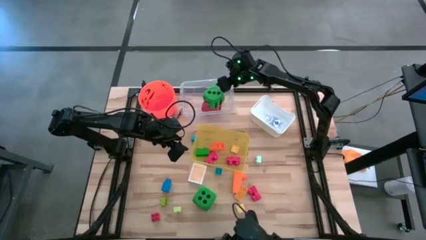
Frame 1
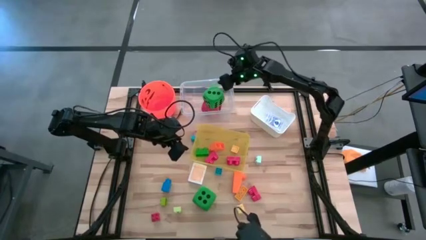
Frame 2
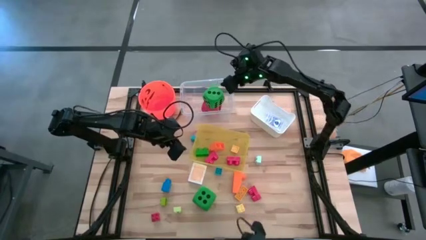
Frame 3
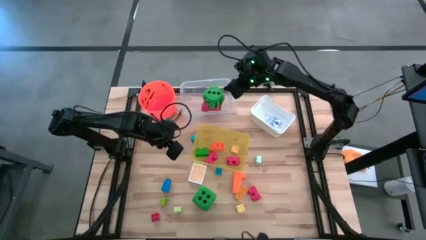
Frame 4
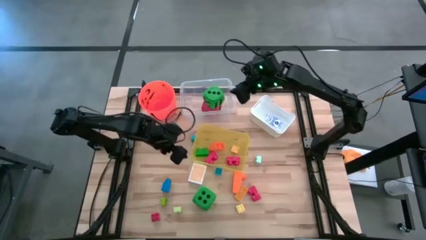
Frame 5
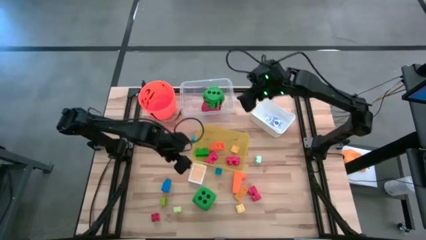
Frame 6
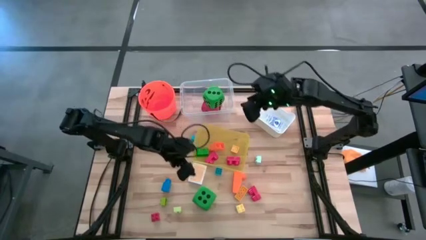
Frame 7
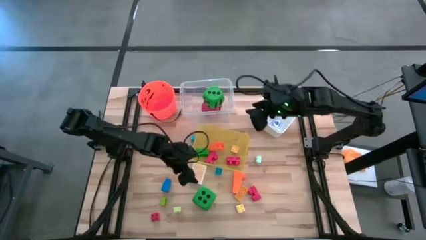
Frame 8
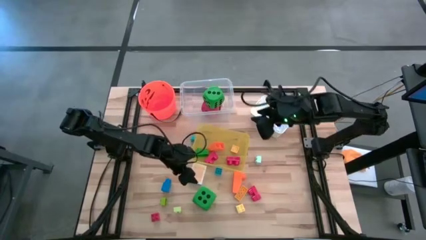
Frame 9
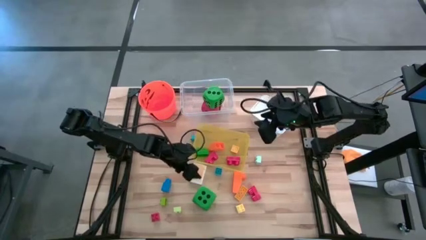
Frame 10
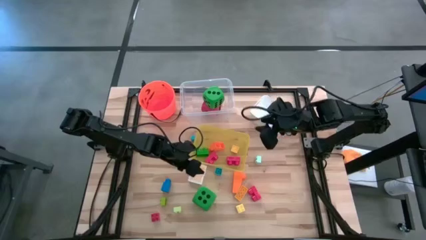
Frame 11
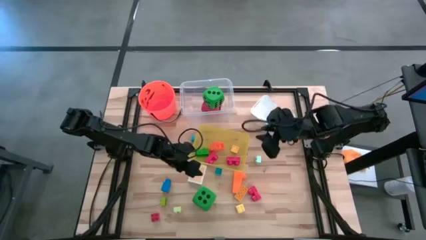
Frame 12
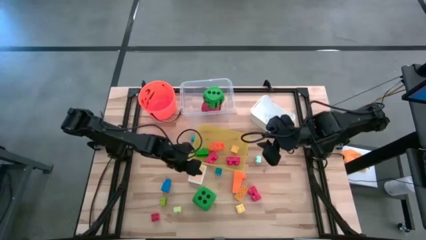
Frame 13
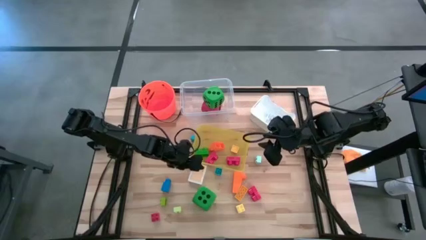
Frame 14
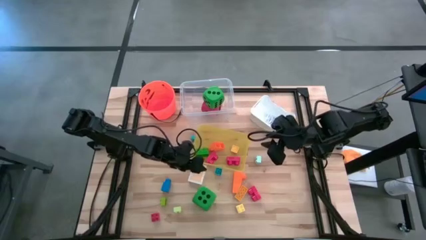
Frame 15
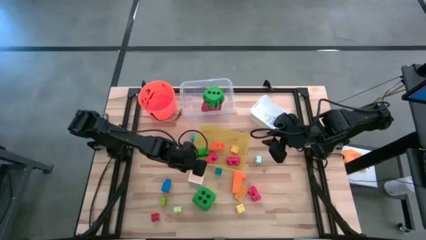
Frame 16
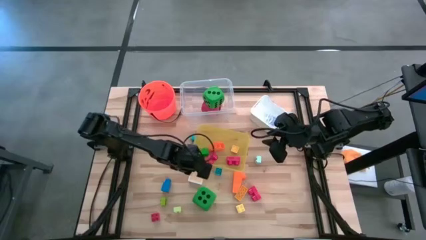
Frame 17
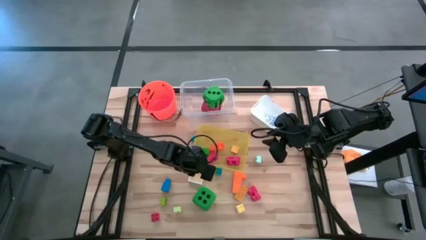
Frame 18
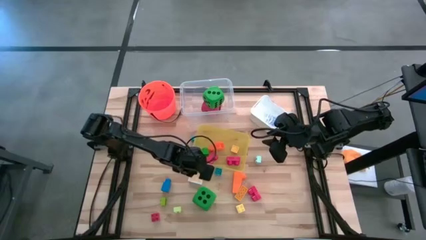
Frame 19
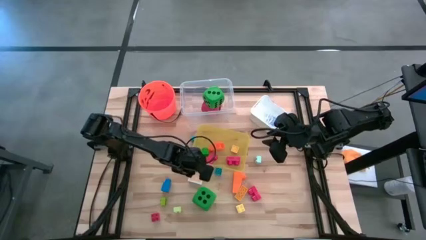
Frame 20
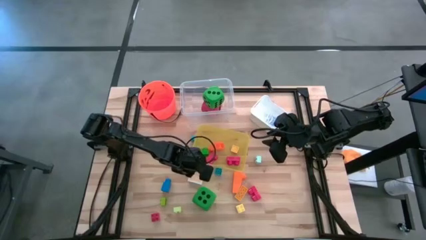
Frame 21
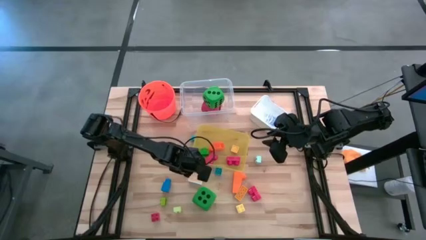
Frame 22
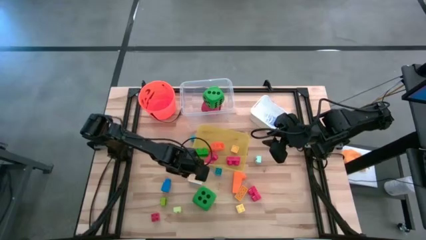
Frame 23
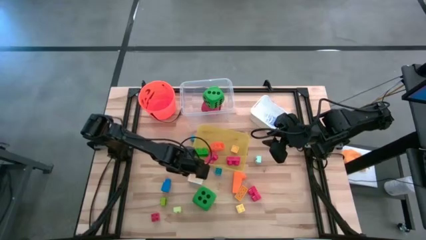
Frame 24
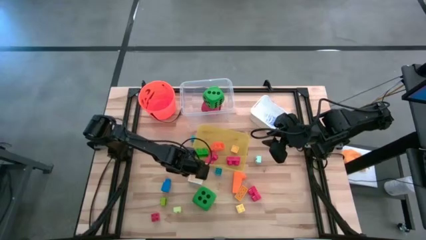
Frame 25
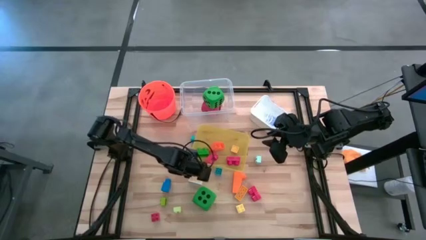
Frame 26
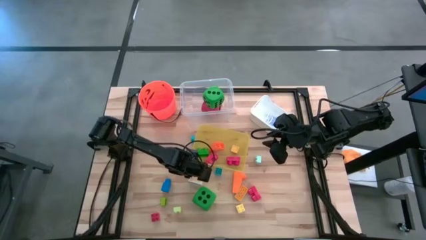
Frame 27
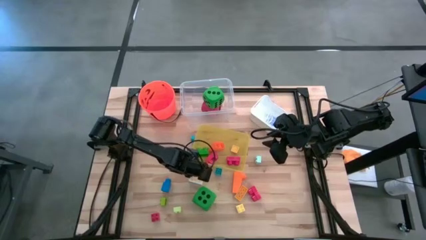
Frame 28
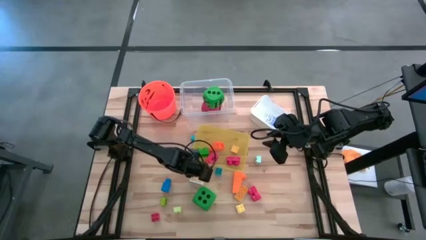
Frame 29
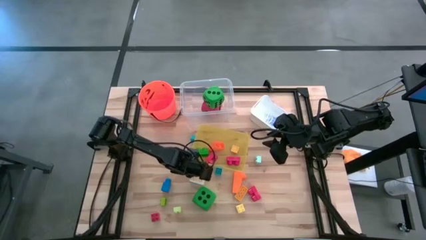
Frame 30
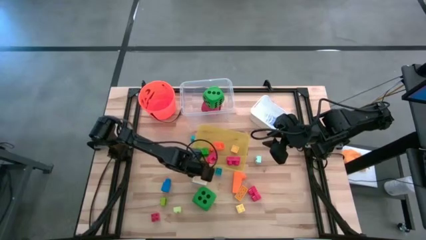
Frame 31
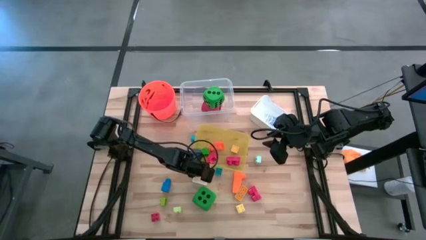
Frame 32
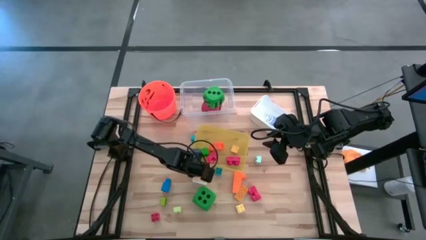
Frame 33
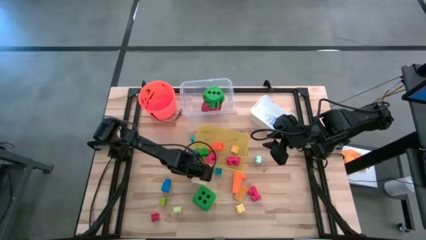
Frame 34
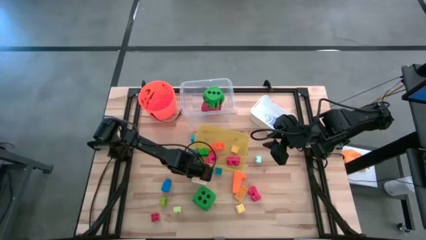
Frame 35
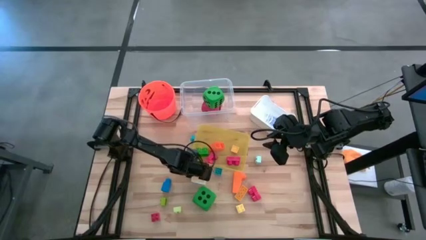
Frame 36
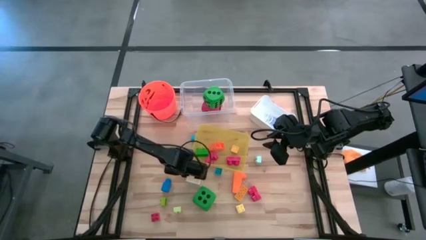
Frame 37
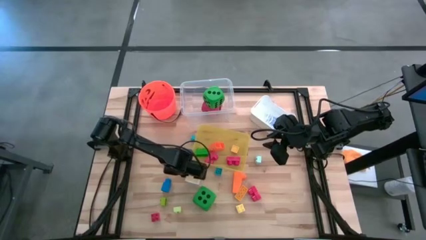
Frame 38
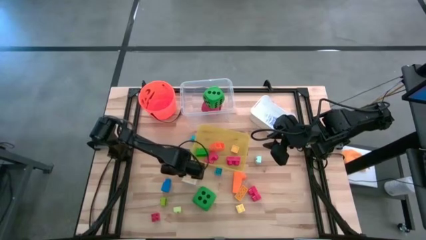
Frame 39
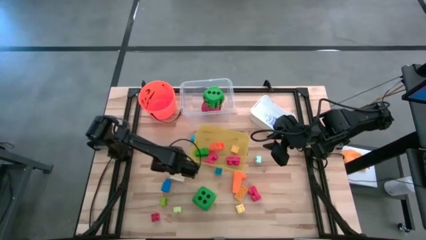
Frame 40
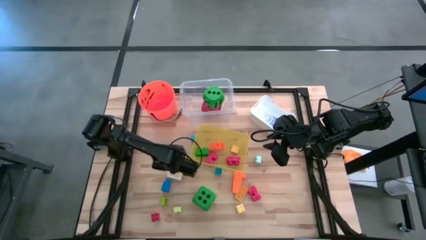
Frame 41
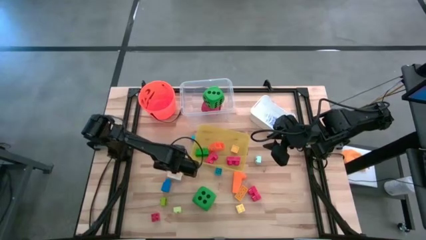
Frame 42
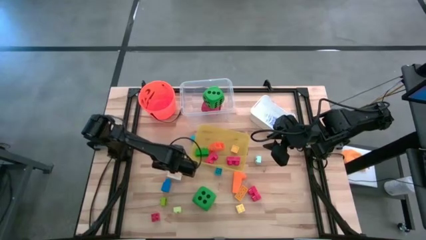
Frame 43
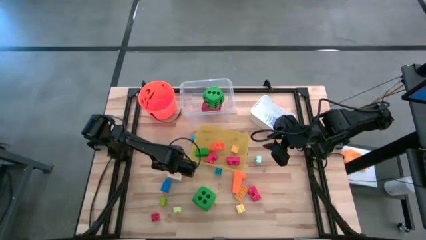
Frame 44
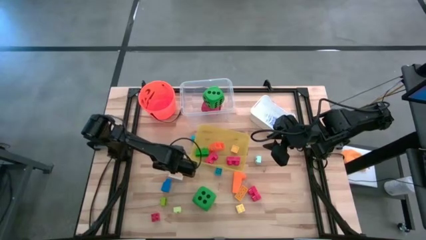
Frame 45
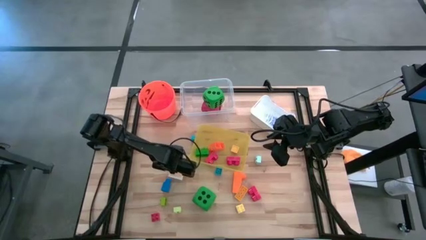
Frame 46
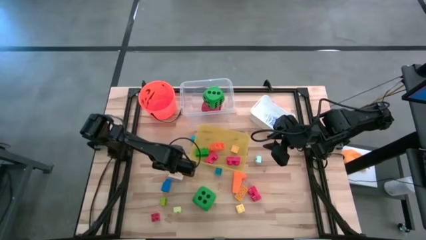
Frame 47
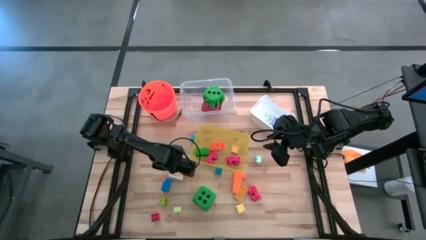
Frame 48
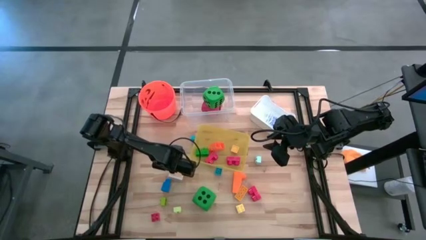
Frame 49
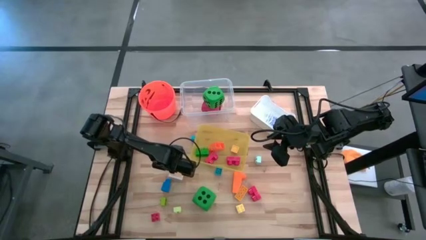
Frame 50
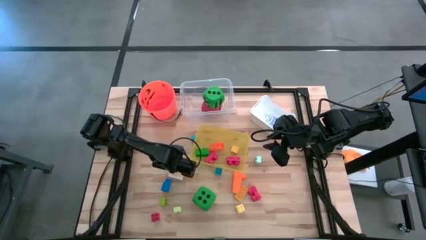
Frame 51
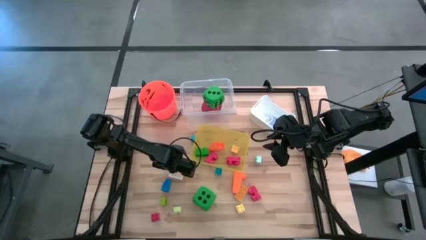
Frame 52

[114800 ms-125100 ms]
Task: Pick & Place Toys
Put the yellow game card into the white bin

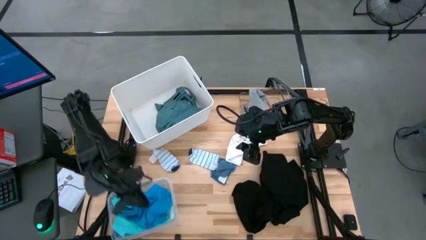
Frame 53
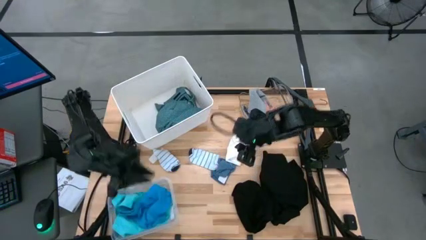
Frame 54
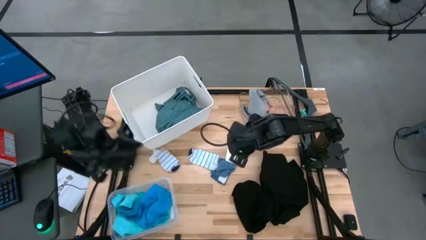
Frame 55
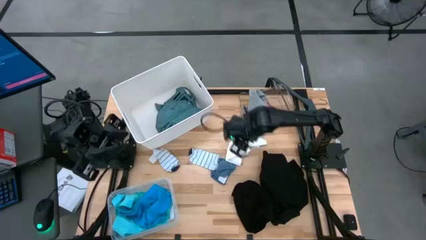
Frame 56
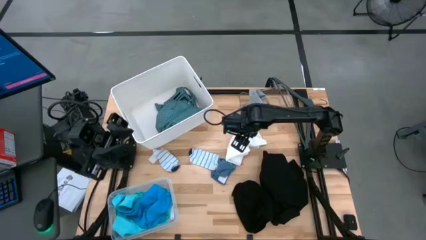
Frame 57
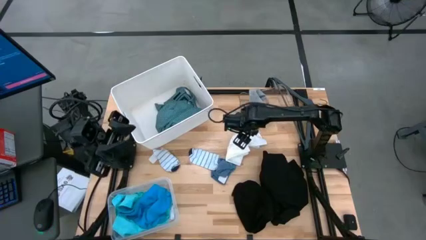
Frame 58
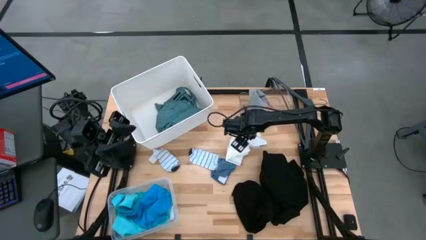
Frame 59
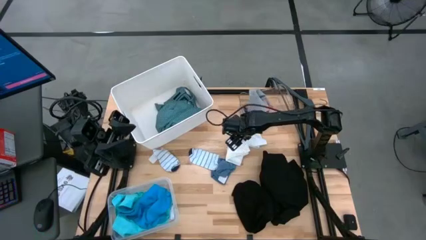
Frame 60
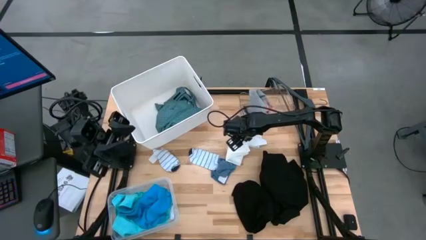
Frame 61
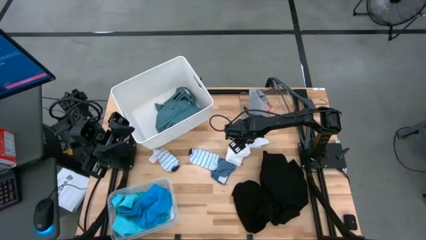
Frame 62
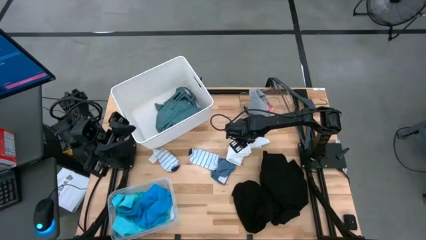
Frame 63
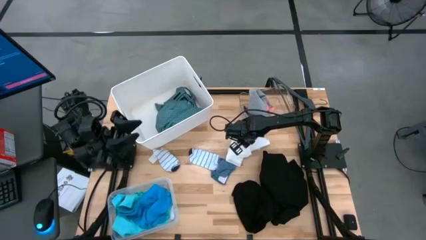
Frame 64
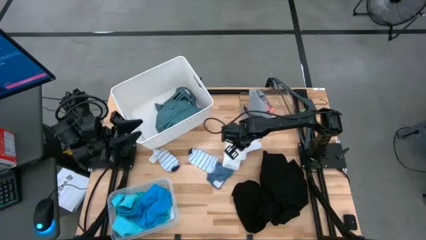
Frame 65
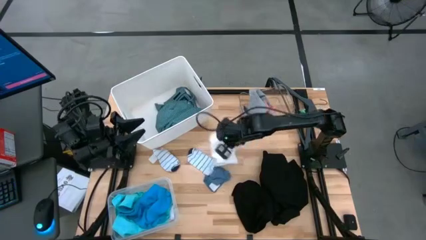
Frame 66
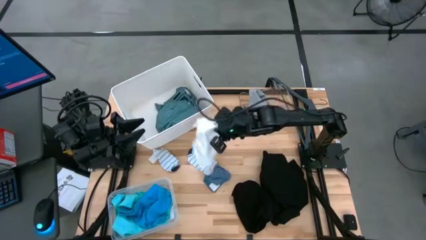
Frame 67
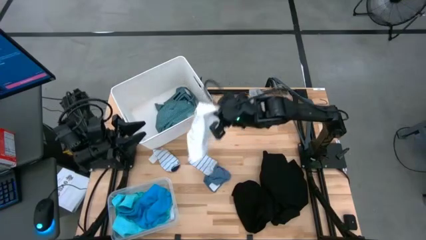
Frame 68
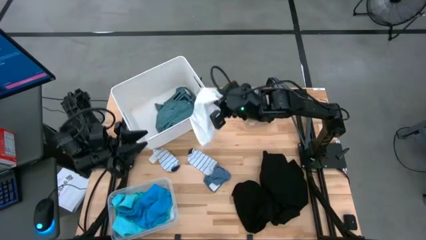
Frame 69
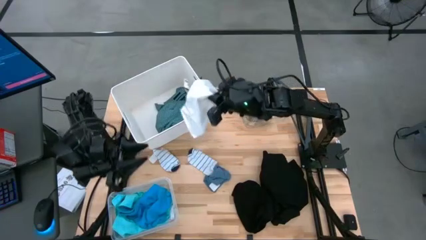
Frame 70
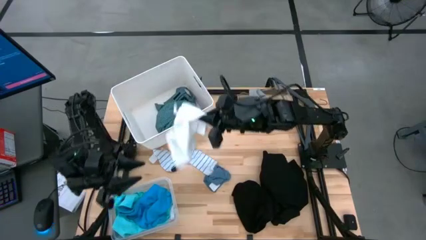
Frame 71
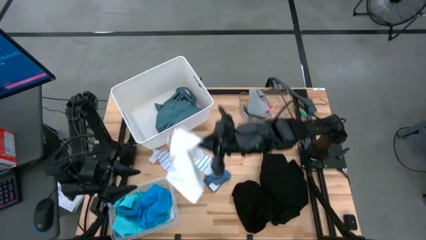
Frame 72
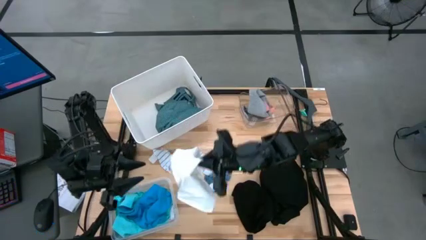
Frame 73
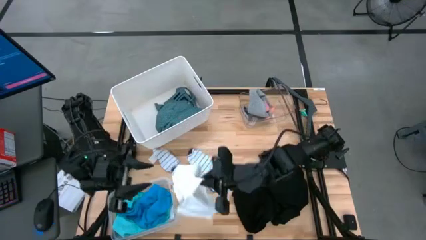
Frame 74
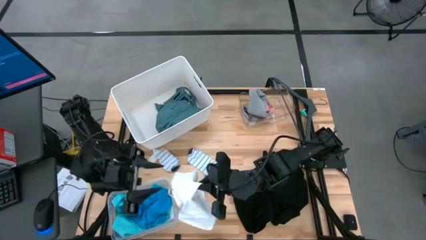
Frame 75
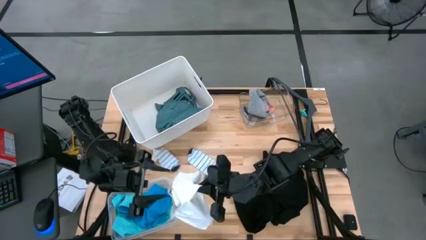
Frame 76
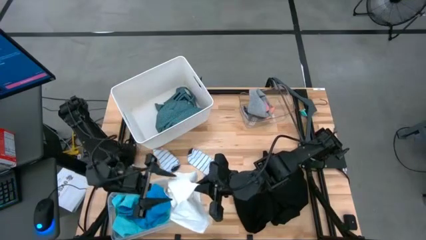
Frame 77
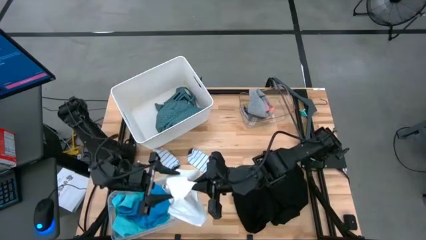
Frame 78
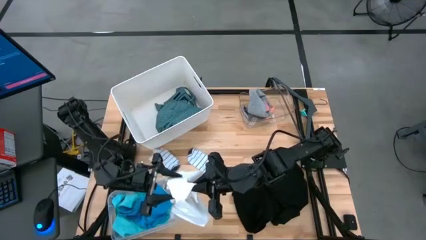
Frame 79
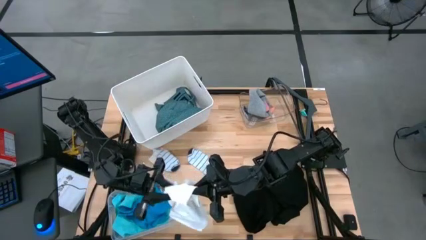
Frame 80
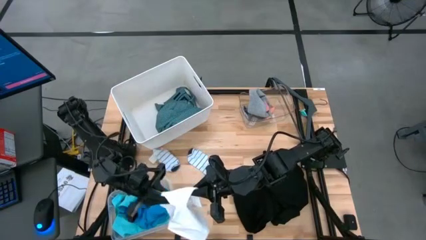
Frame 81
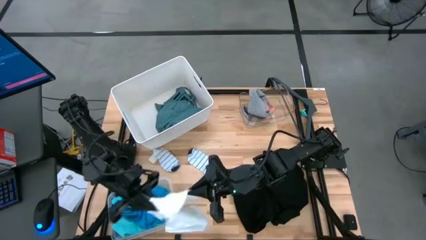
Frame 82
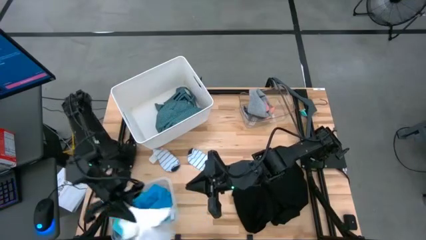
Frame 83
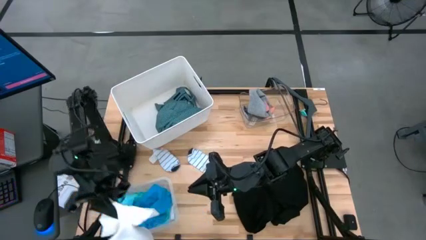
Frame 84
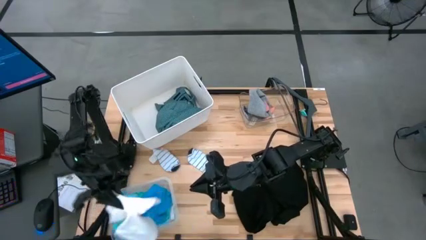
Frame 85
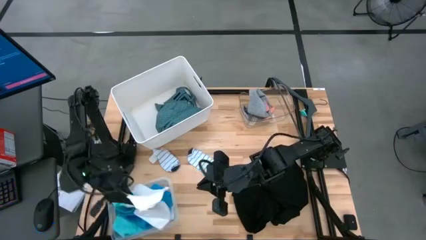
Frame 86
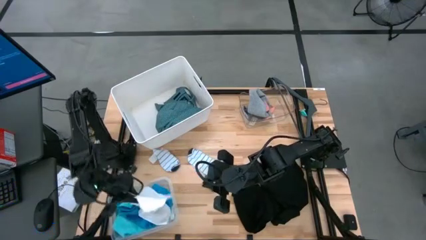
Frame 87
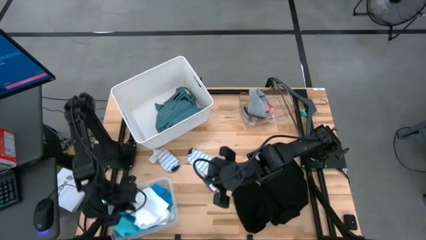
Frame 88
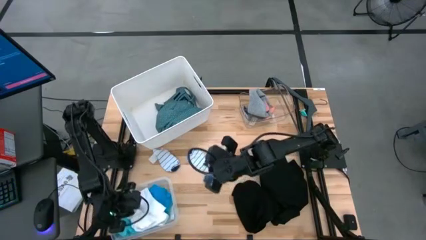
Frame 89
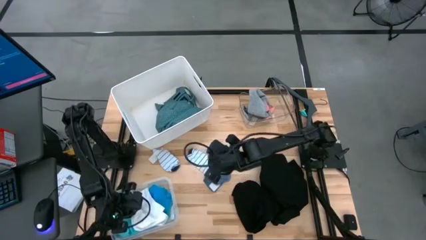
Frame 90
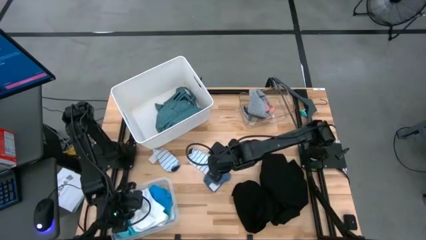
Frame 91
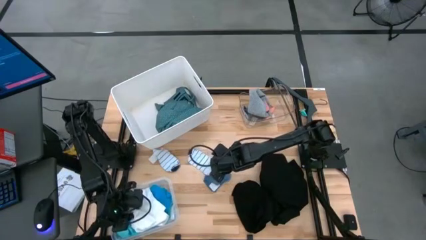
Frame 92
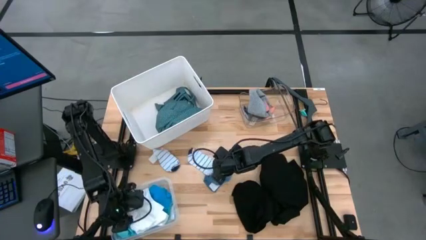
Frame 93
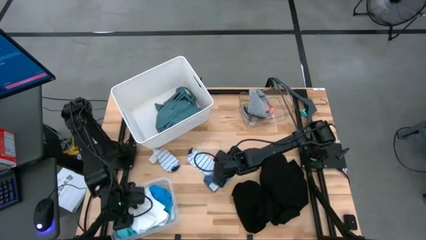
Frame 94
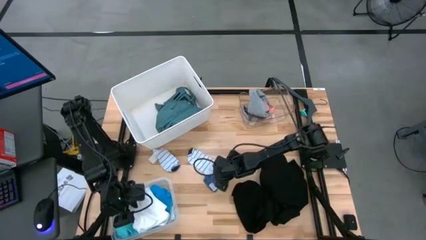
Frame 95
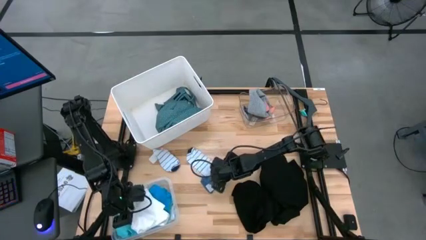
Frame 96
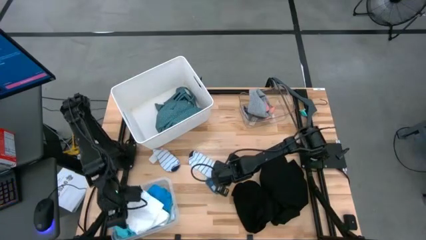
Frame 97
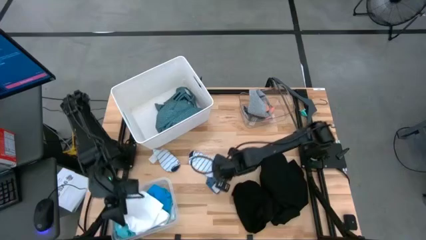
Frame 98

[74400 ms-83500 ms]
Task: Pick & Place Cloths
Put the white underwear into the bottom transparent bin
